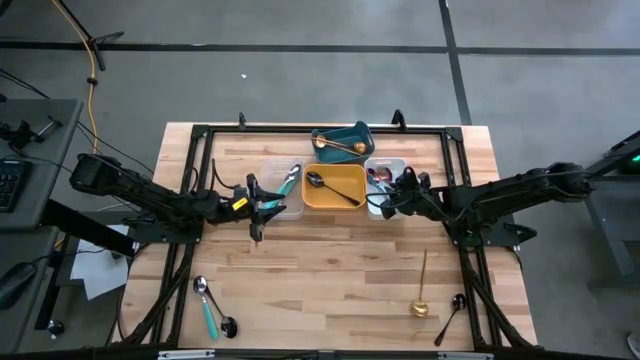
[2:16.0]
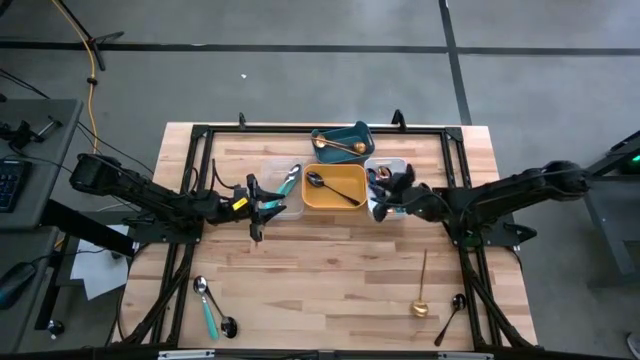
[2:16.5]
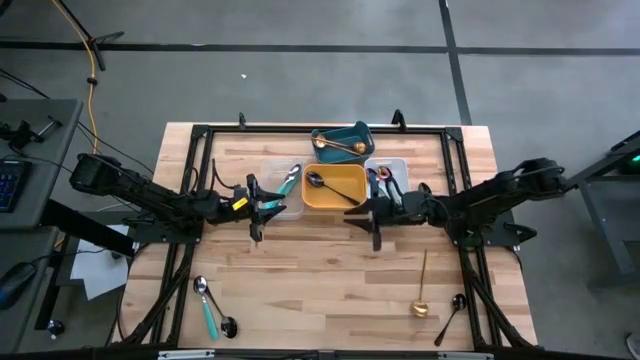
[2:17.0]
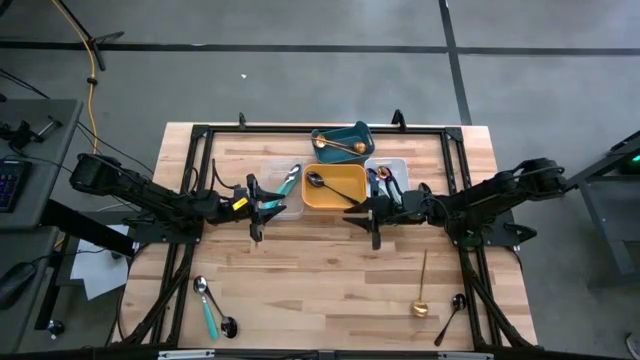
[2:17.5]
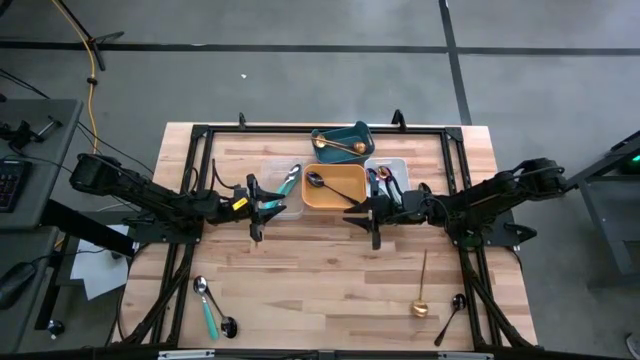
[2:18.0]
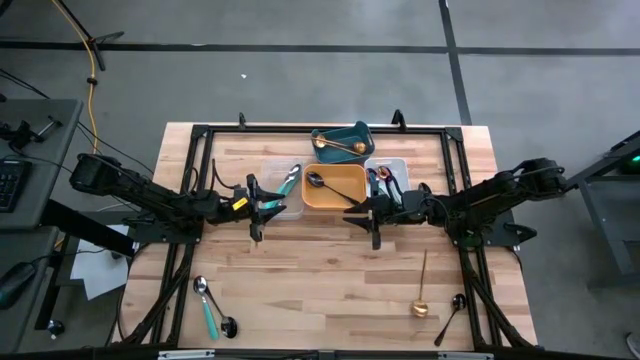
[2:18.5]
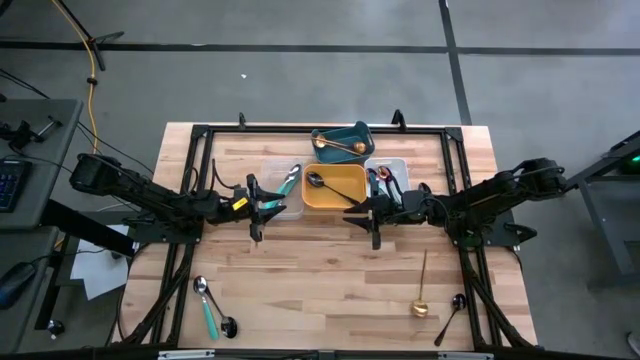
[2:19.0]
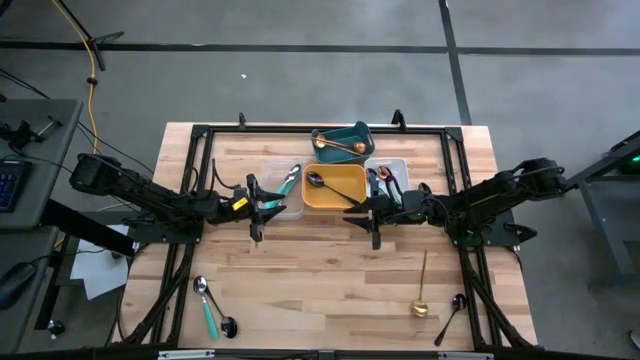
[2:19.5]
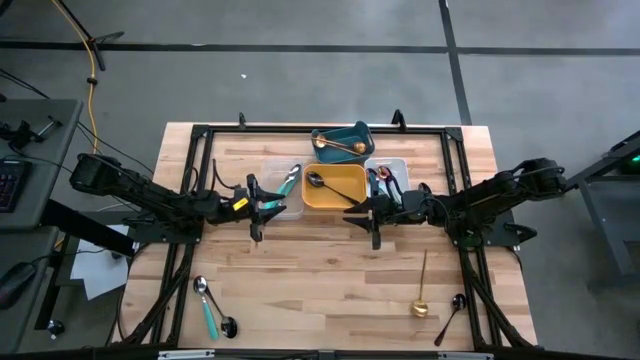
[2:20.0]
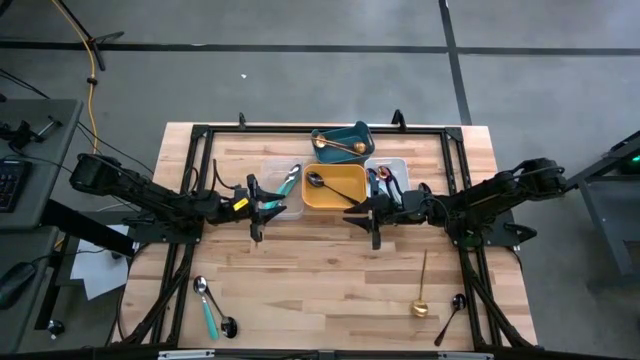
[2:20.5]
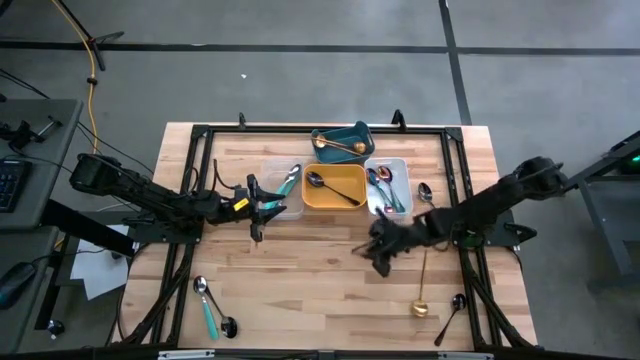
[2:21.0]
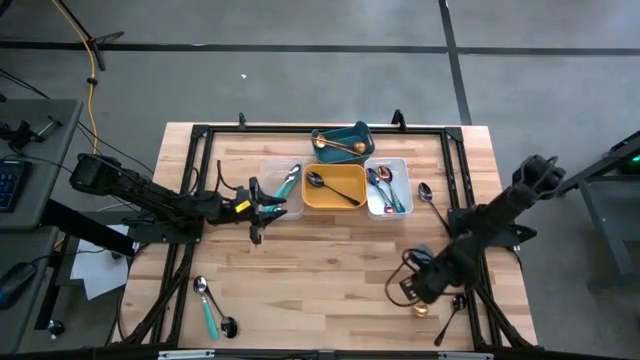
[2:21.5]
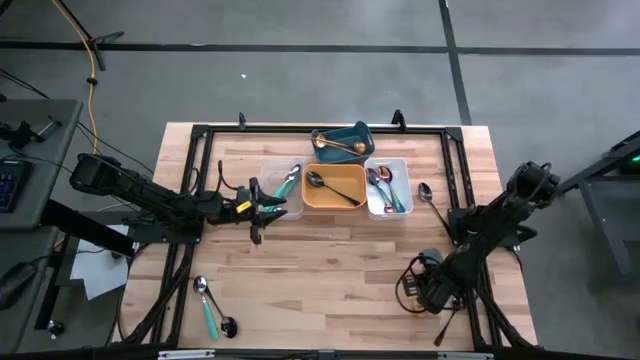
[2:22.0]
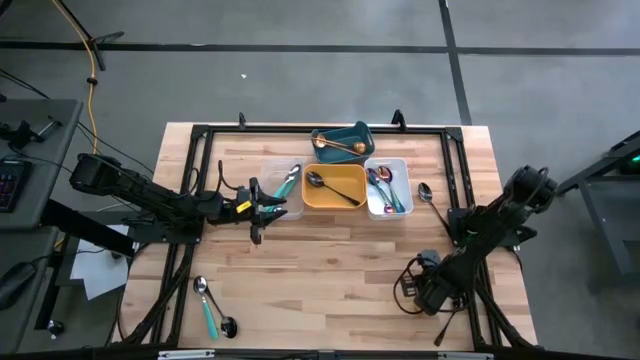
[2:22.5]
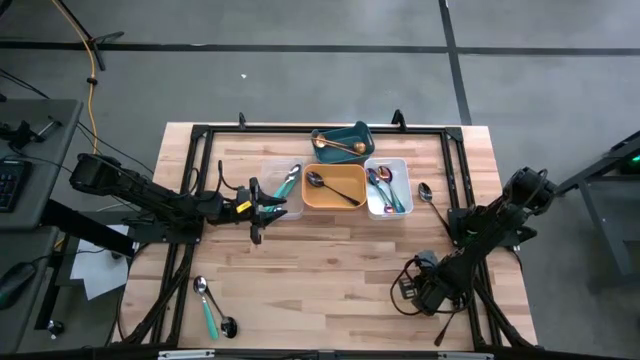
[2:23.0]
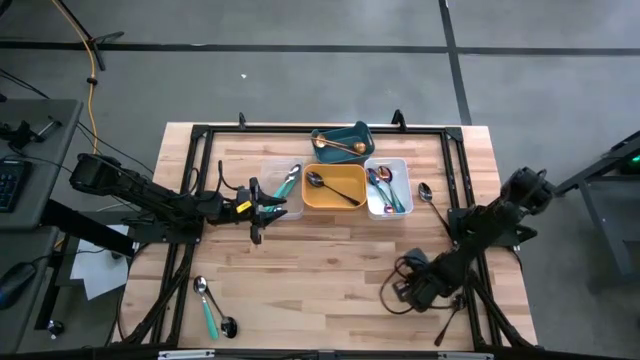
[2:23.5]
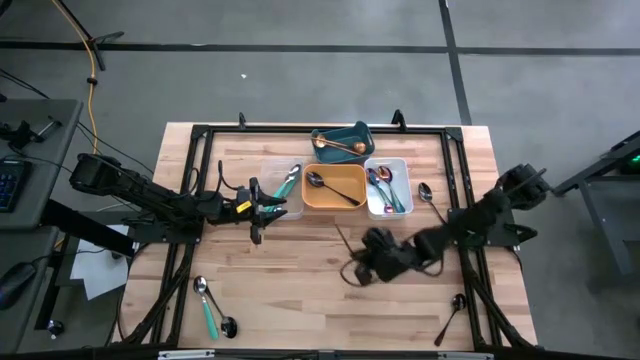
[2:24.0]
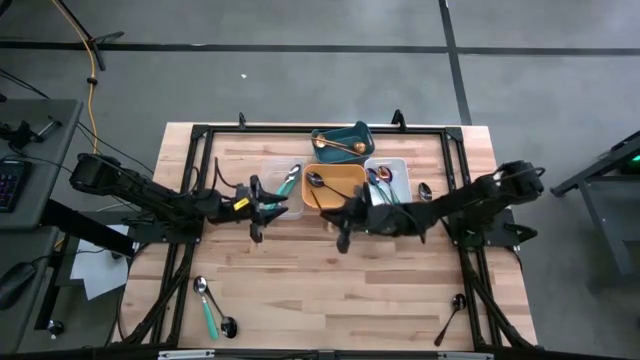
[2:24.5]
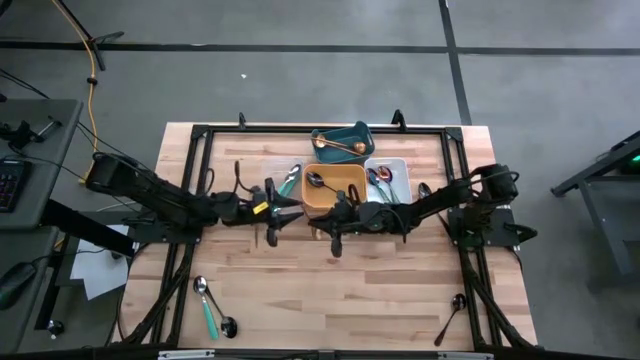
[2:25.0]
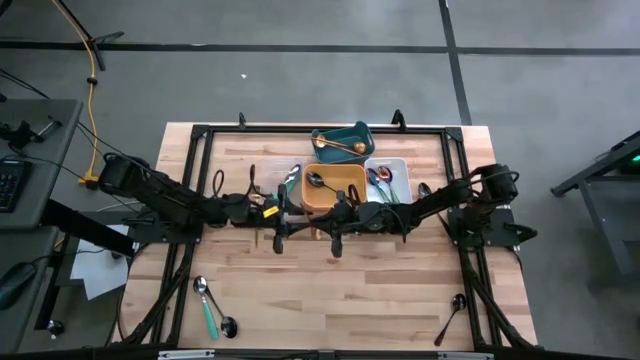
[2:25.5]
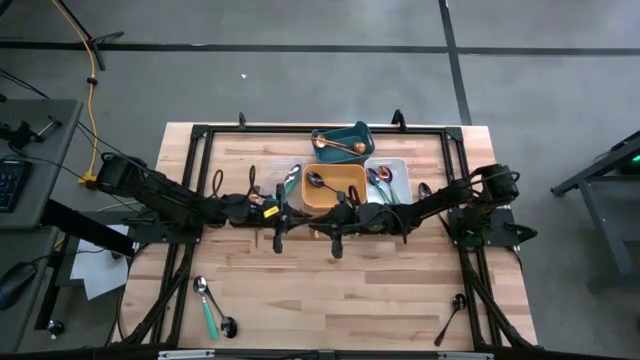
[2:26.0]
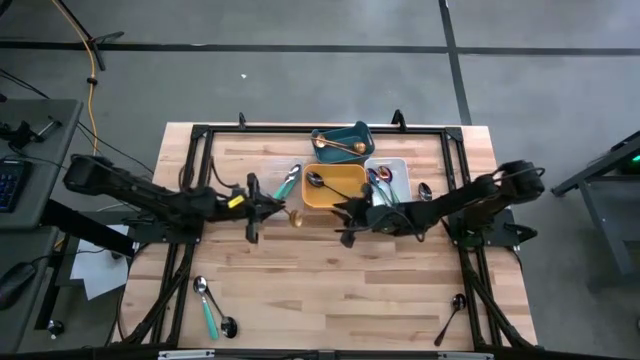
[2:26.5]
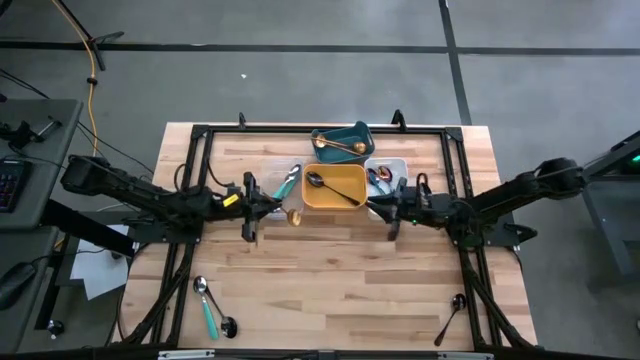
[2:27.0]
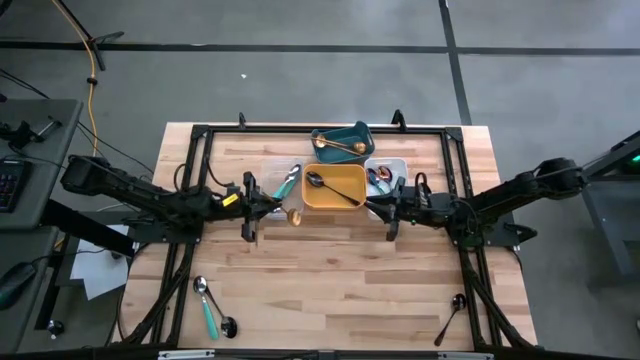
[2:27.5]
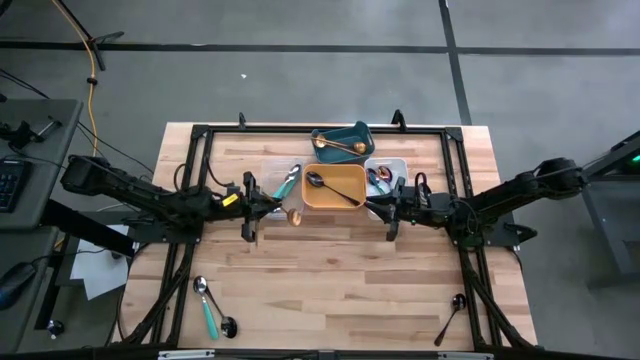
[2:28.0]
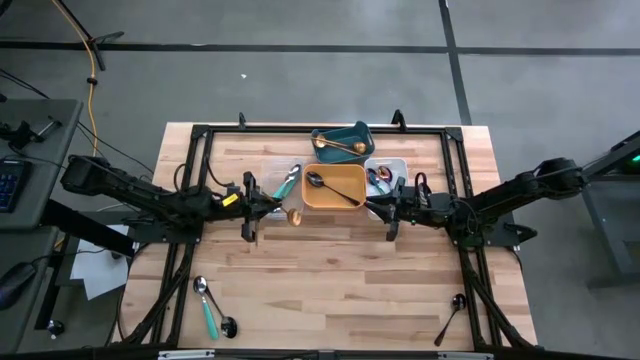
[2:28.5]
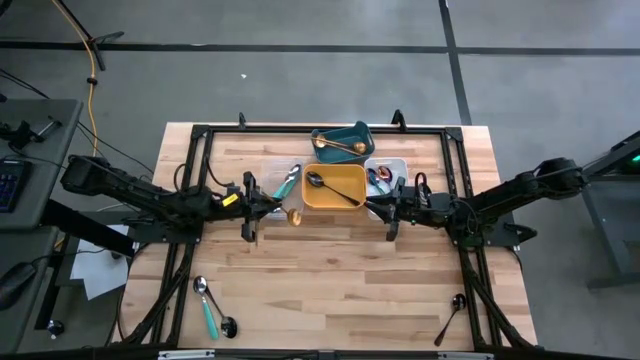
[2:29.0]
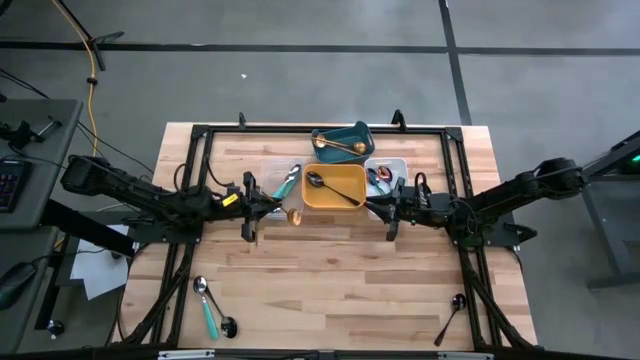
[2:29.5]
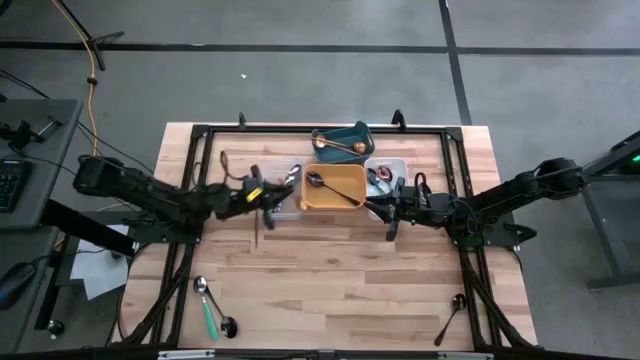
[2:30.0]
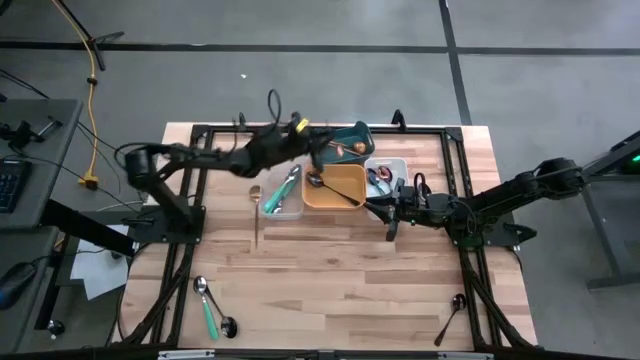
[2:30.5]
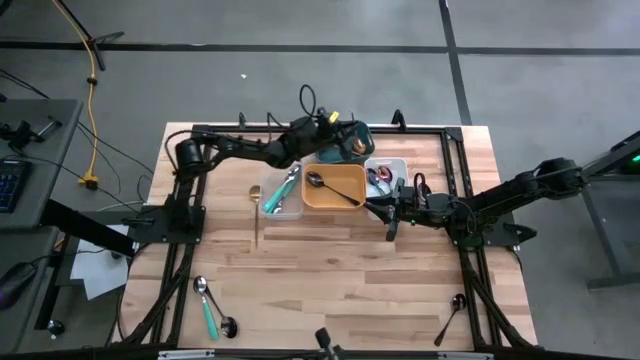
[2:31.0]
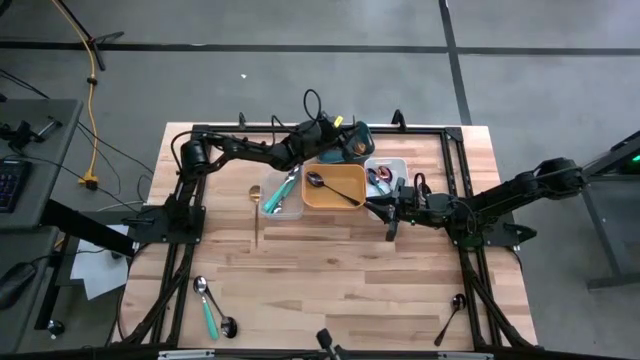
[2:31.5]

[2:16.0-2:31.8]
Task: Sort silverware by color (type)
Put the gold color spoon into the green bin

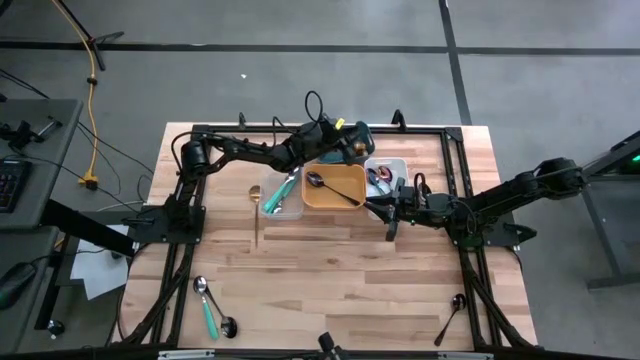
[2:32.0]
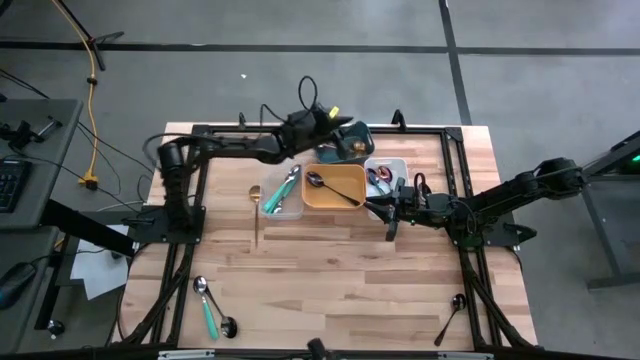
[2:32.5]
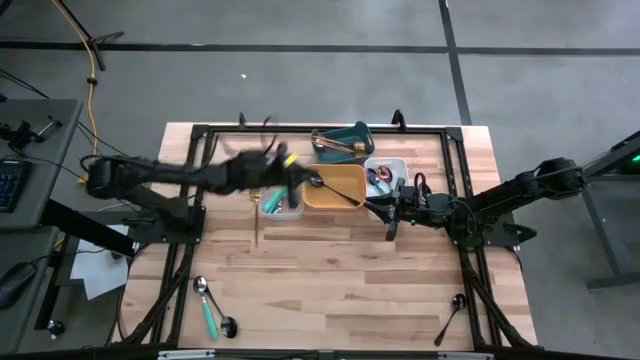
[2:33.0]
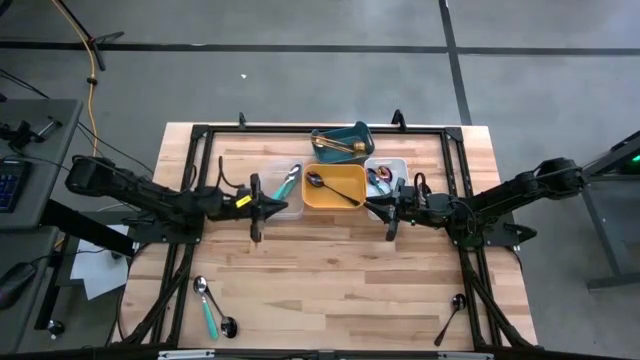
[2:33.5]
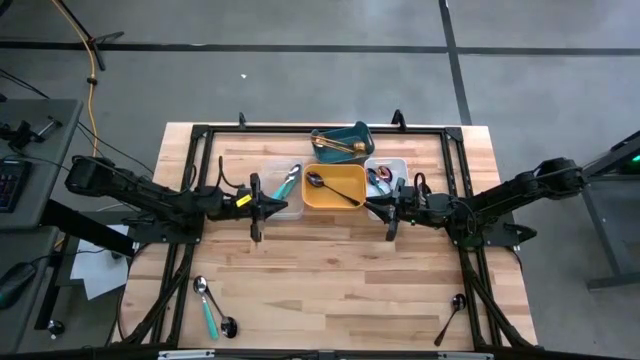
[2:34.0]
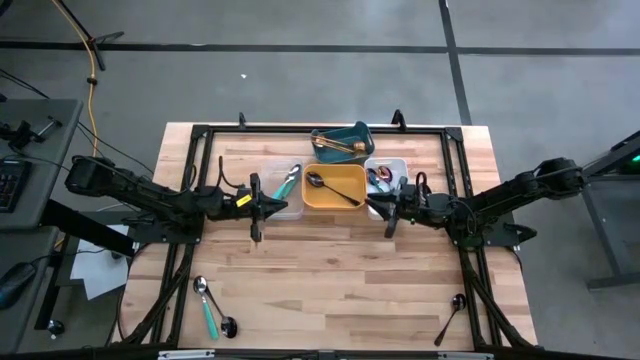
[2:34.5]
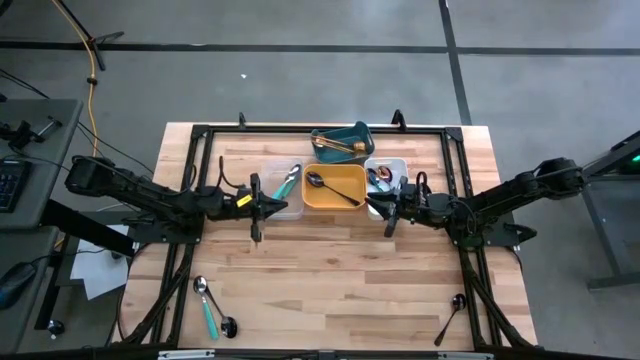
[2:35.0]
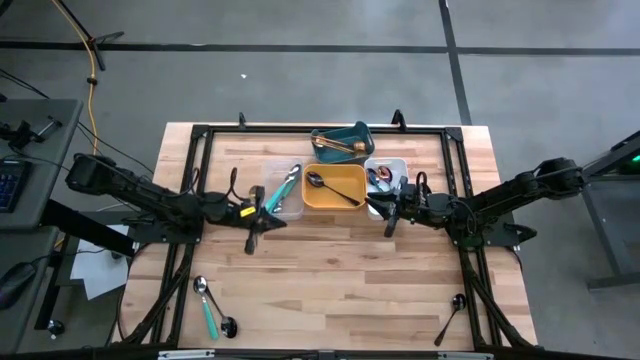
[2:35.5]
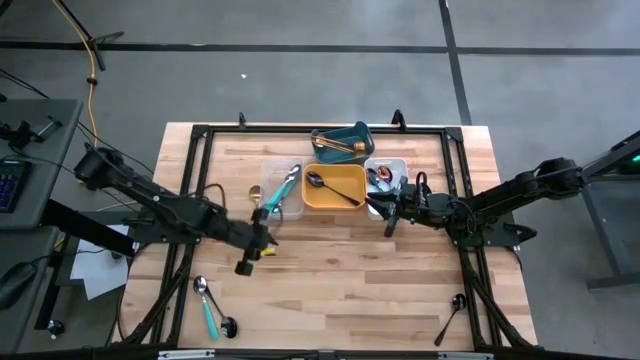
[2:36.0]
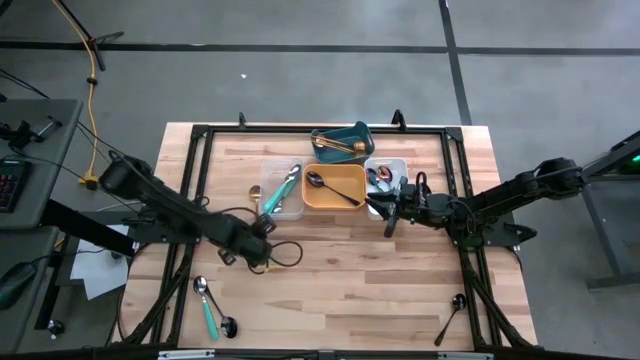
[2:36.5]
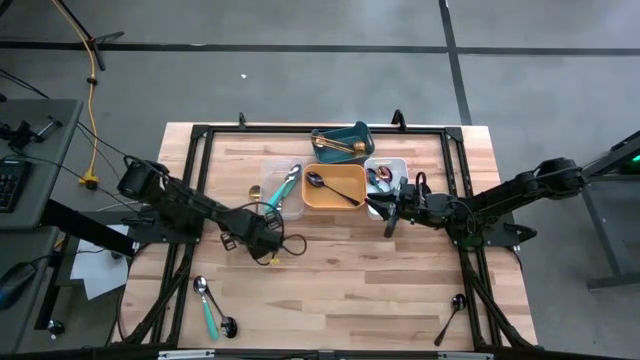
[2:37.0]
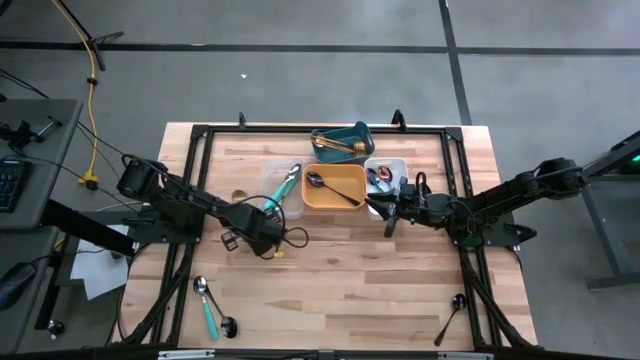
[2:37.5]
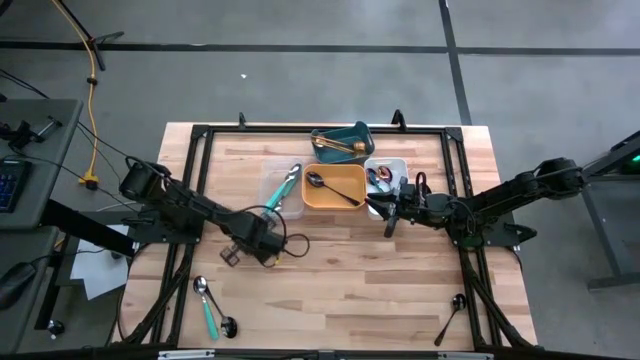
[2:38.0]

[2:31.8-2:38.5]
Put the gold color spoon into the green bin
